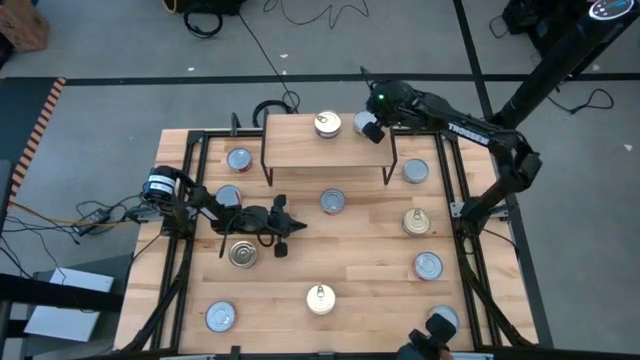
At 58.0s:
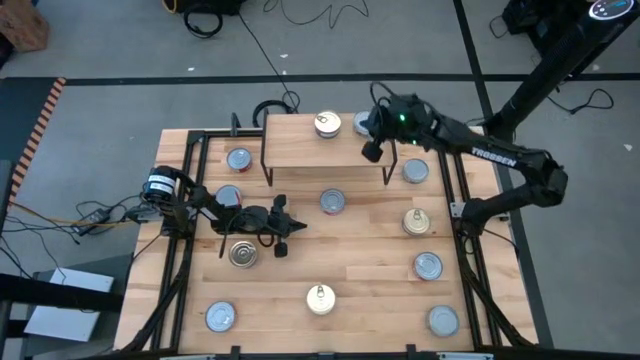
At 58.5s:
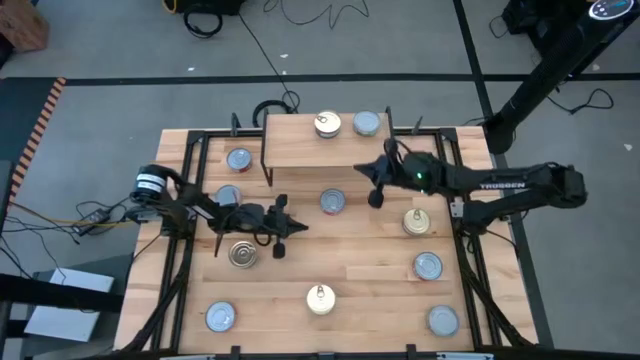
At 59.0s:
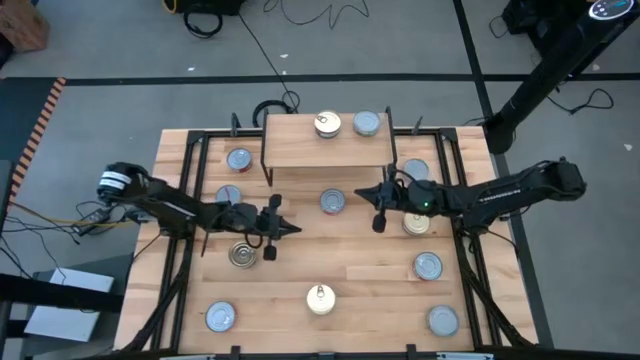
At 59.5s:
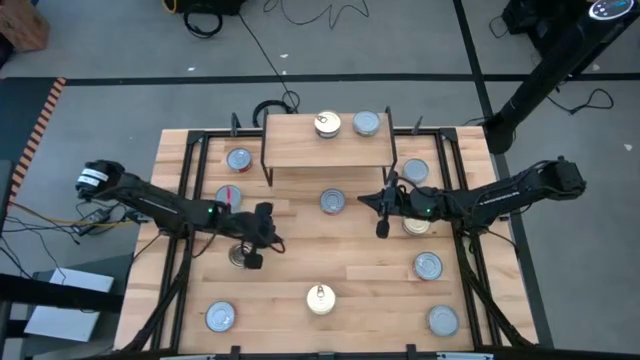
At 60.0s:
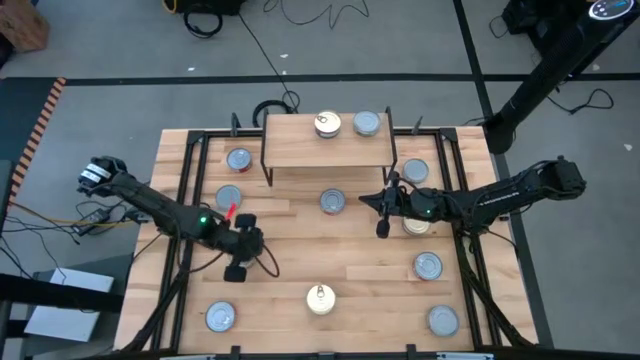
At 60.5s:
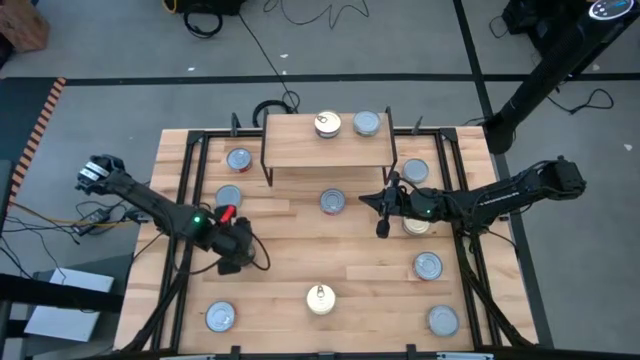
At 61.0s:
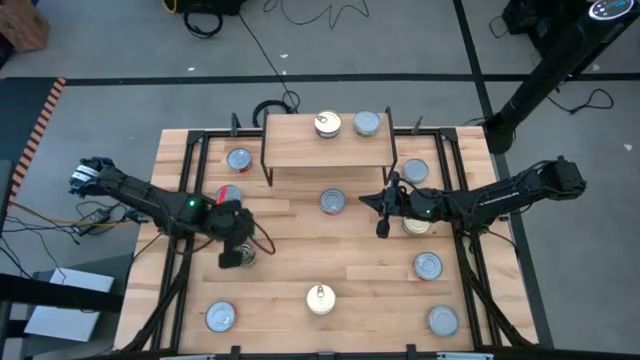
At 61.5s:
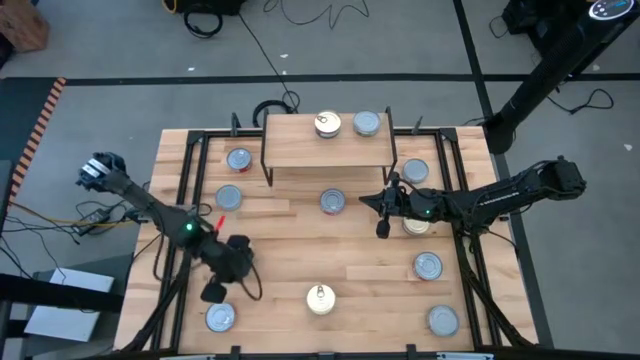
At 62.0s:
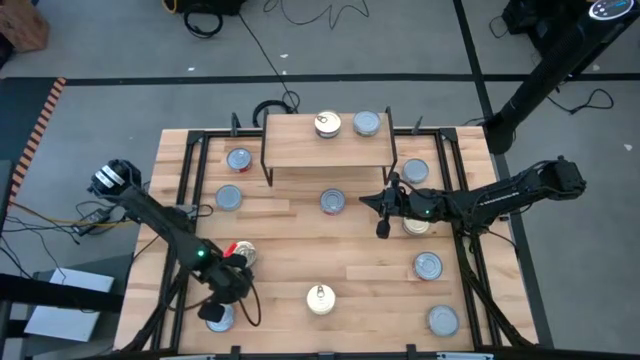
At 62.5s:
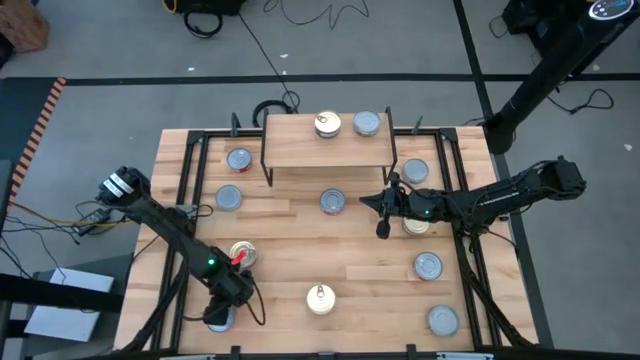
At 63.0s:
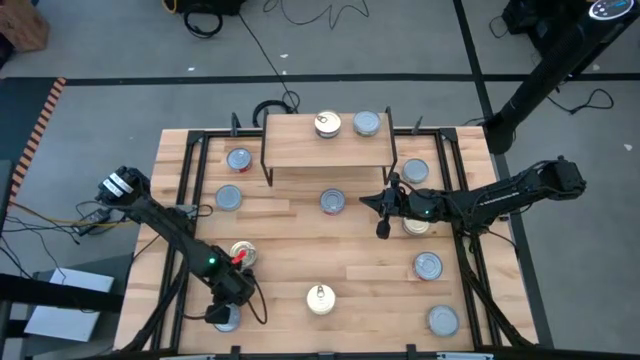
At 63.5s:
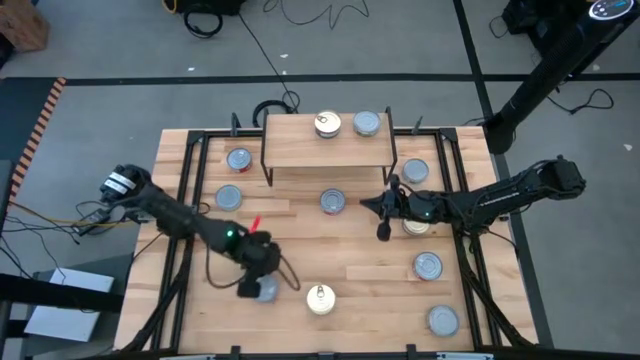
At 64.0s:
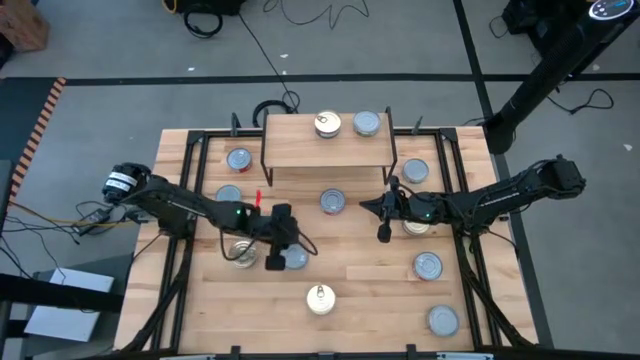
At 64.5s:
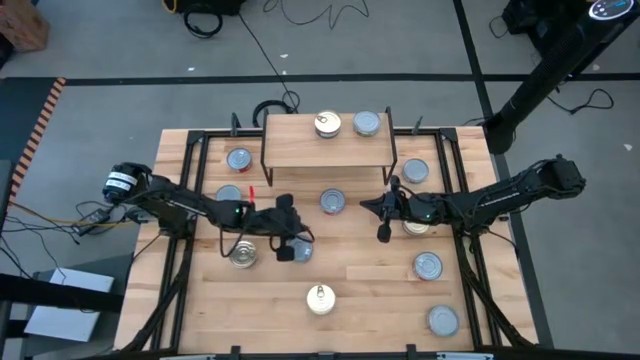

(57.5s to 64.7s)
Task: Stack canned seafood by type on shelf
Put the red tuna can on the shelf

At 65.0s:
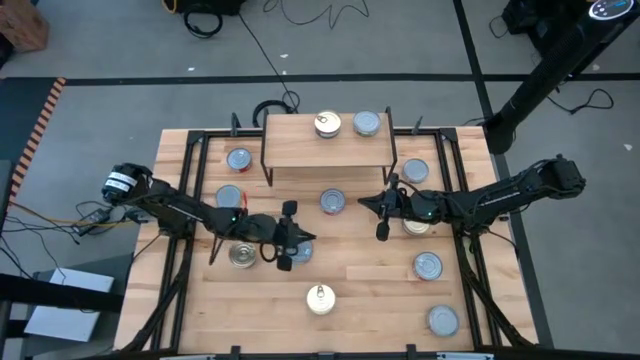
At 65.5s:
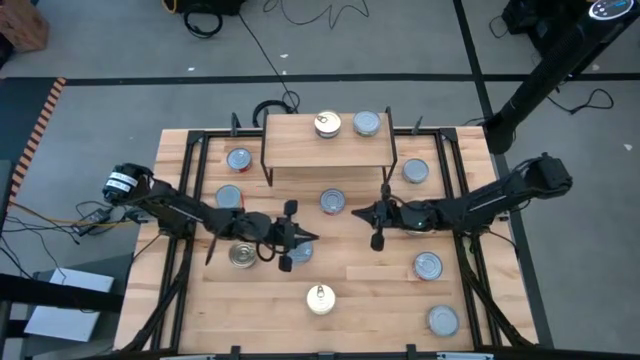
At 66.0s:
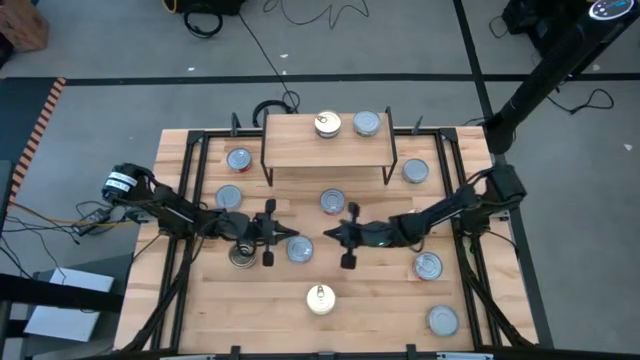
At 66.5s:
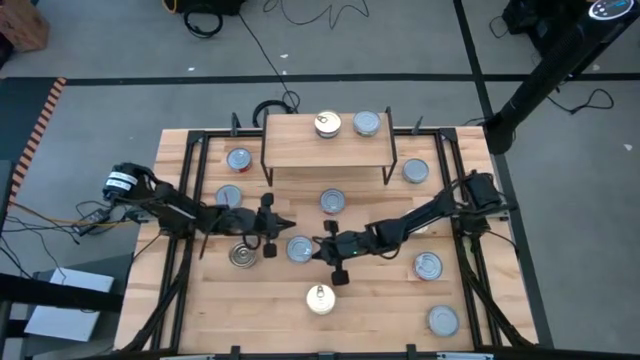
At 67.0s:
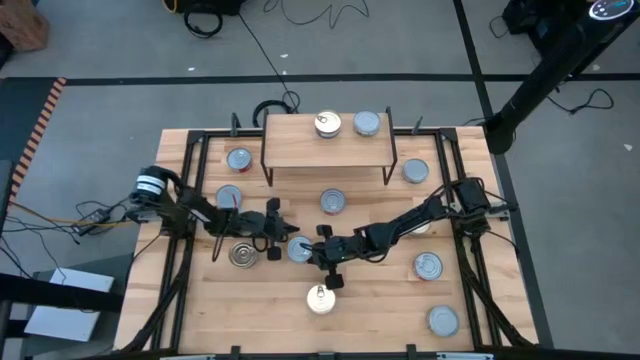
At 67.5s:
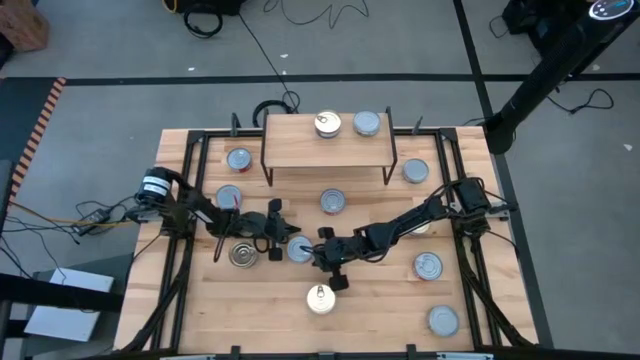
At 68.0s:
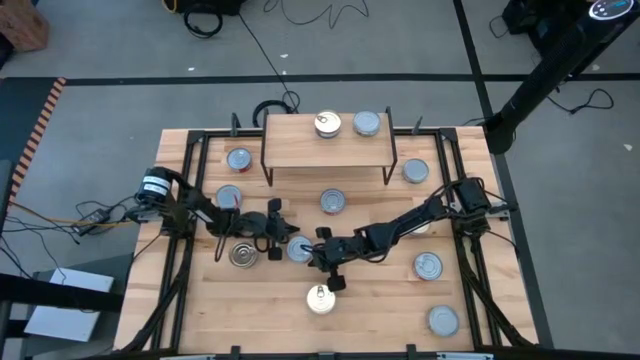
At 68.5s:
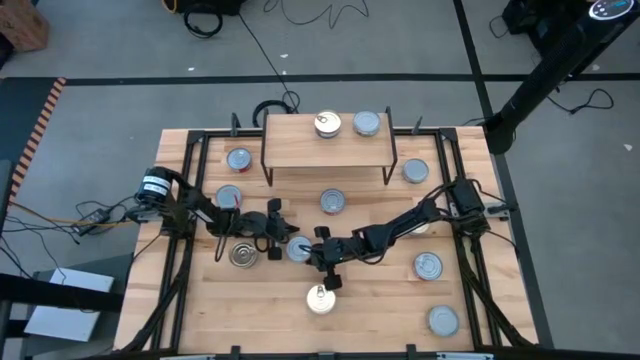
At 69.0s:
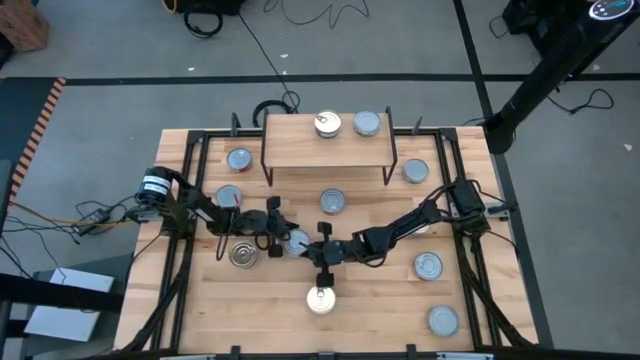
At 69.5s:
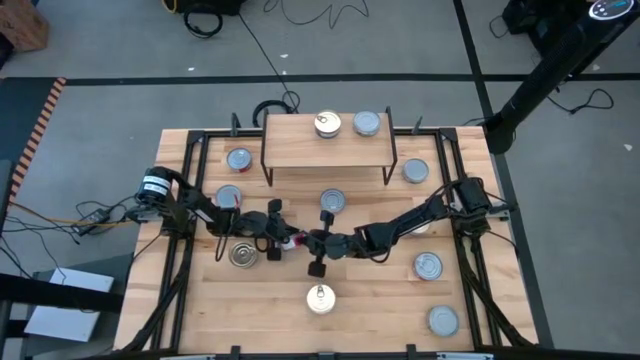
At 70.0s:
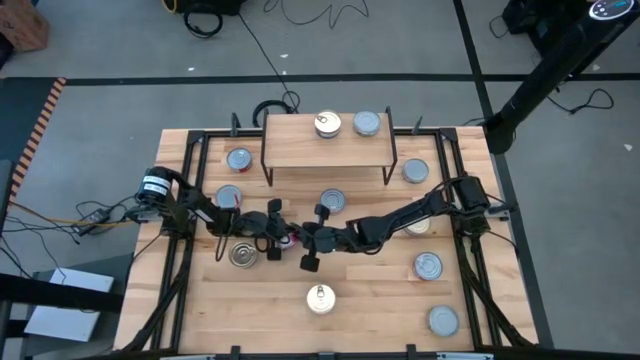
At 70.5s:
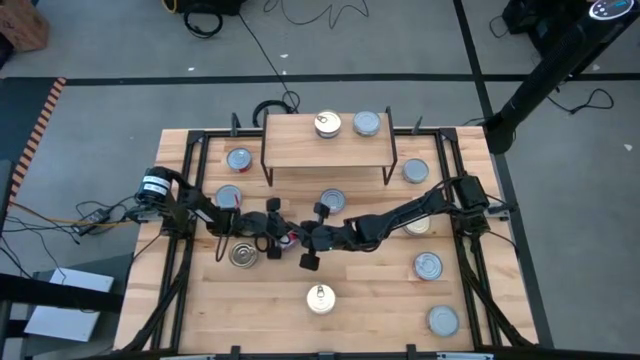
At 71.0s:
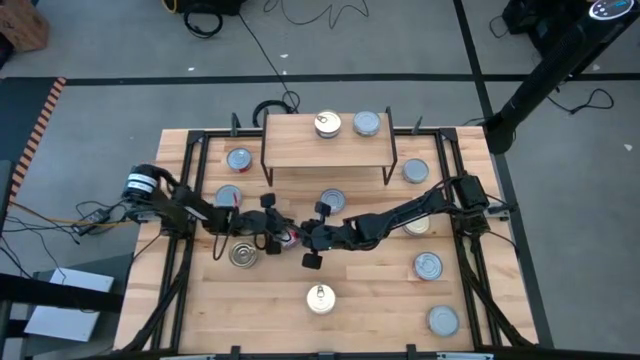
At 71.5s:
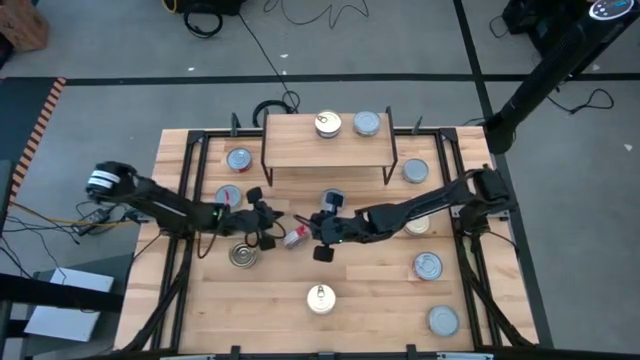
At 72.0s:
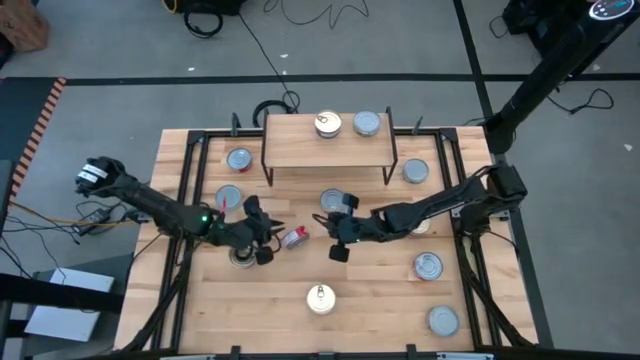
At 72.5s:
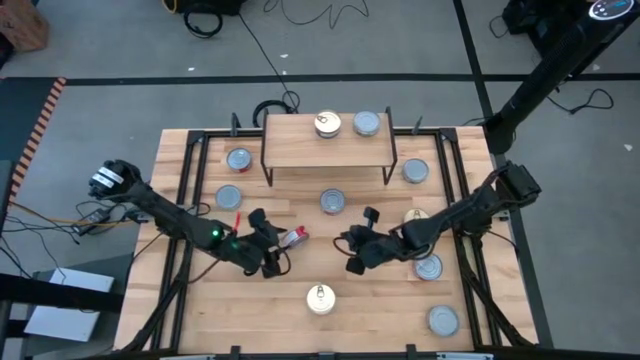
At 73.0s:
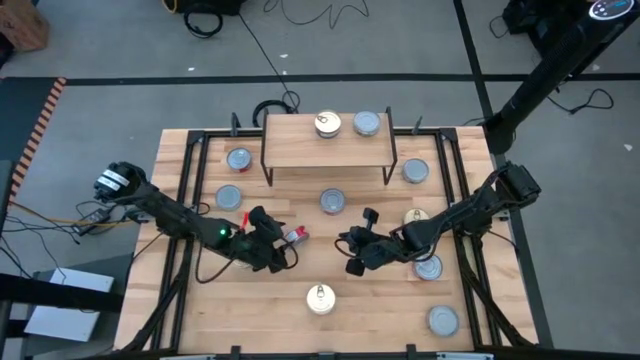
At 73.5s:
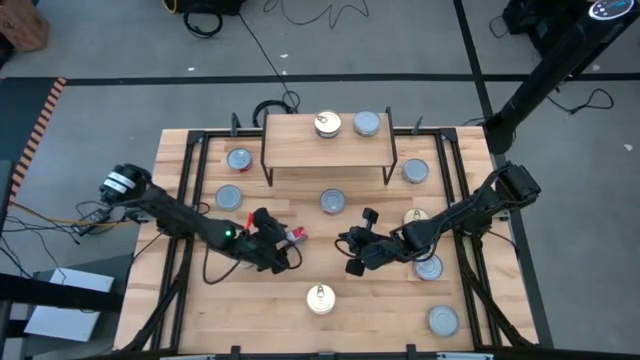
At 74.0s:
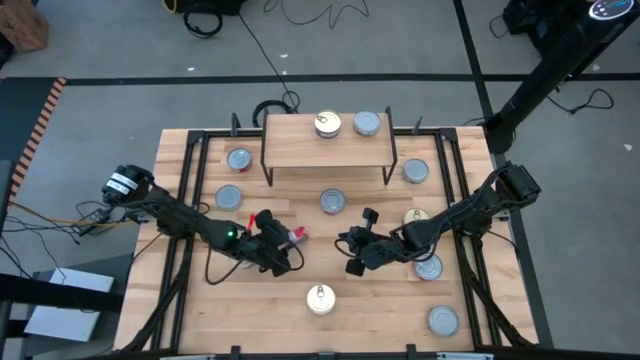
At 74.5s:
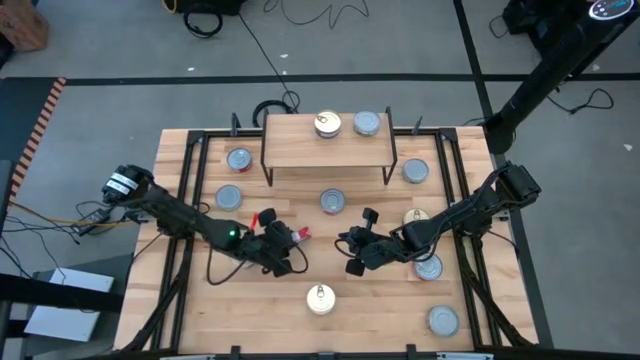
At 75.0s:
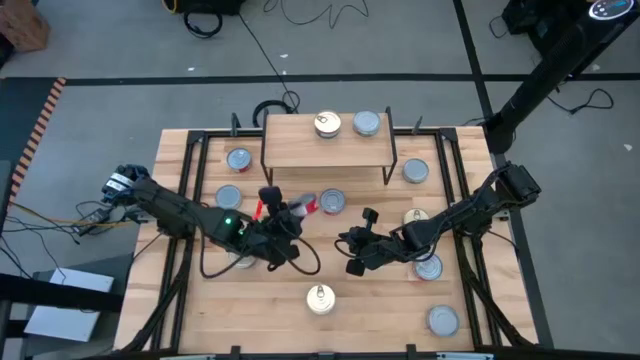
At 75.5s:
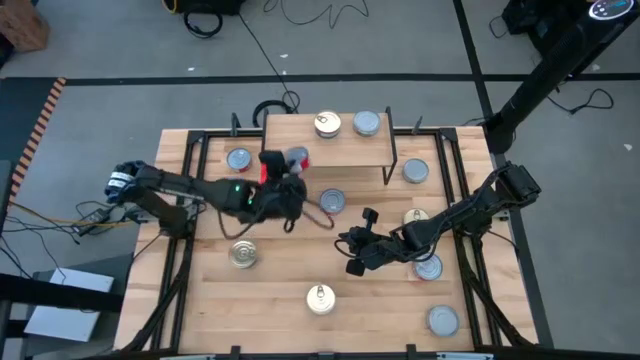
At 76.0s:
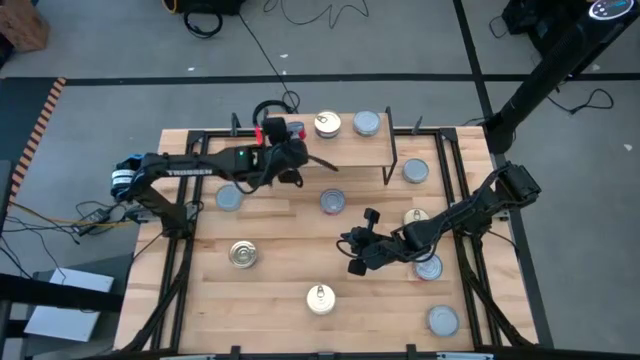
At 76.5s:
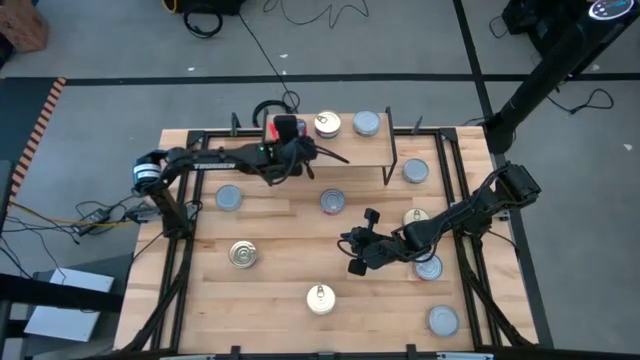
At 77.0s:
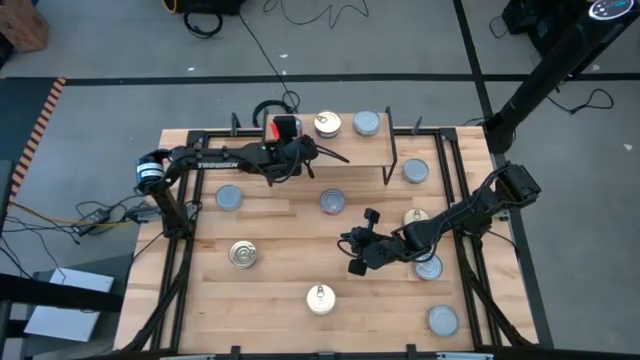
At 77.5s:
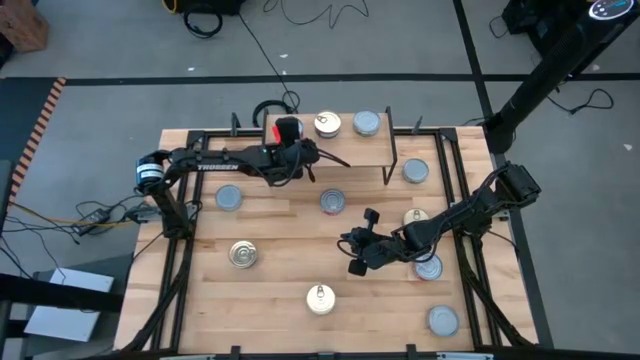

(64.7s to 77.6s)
Put the red tuna can on the shelf
